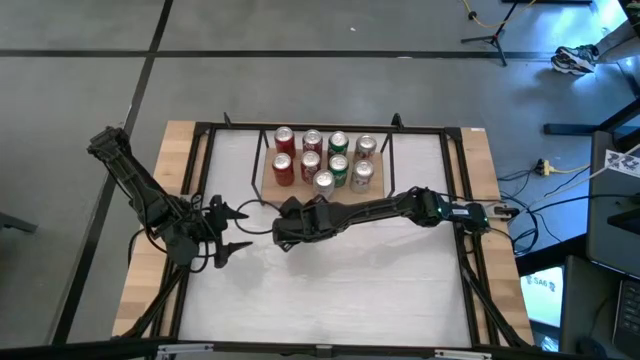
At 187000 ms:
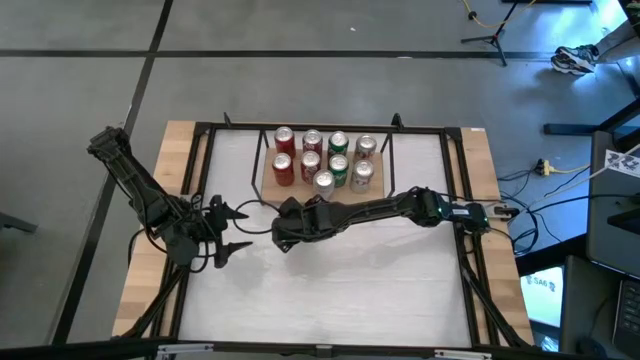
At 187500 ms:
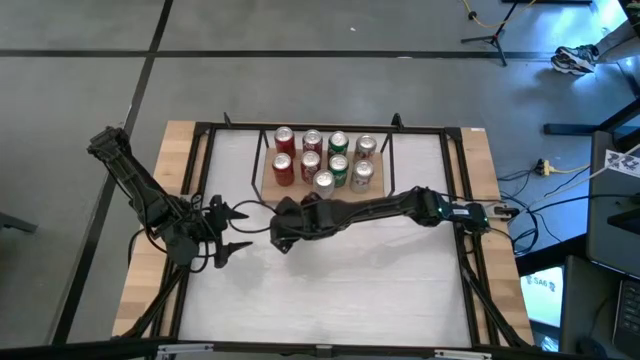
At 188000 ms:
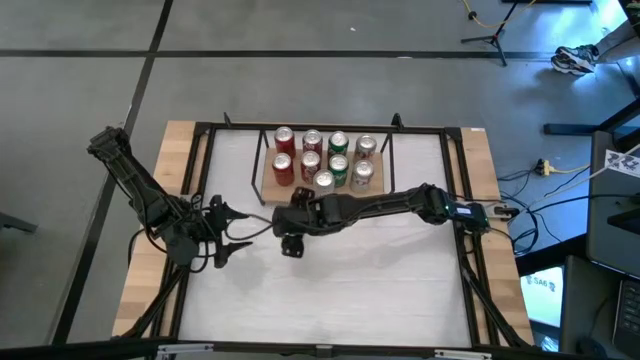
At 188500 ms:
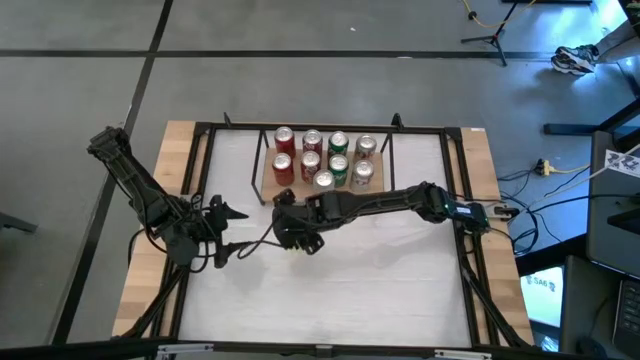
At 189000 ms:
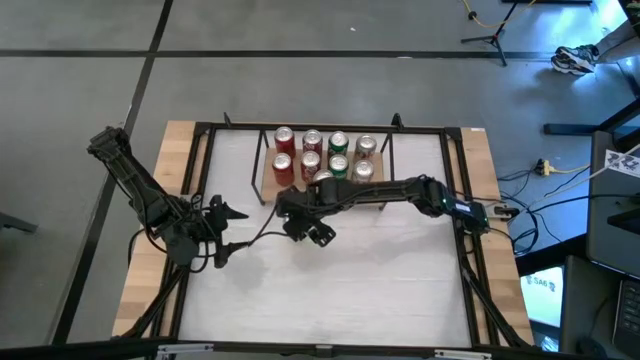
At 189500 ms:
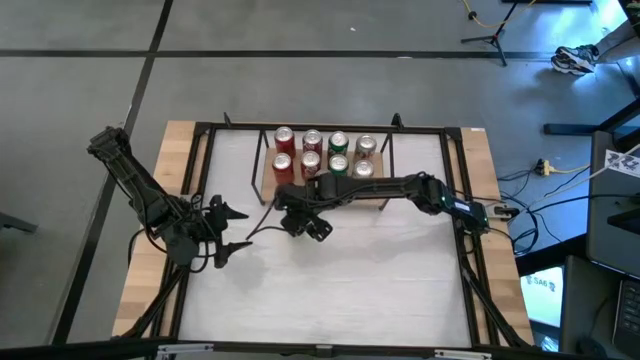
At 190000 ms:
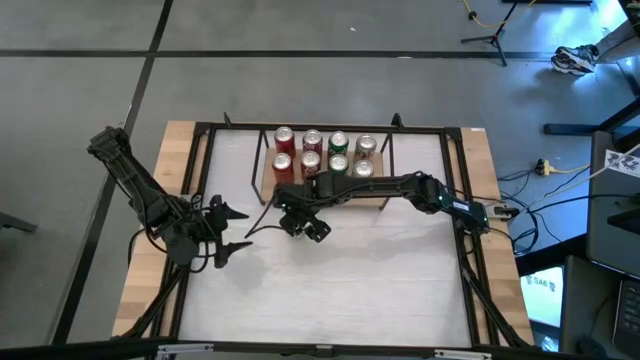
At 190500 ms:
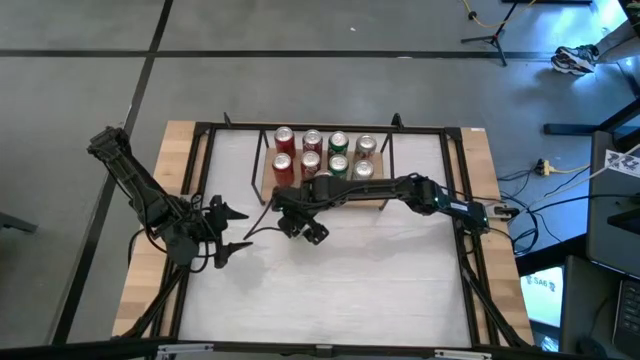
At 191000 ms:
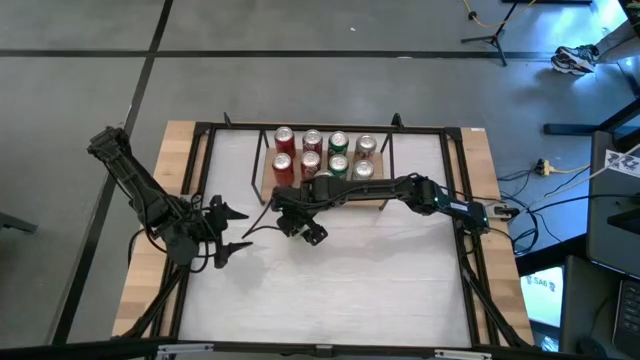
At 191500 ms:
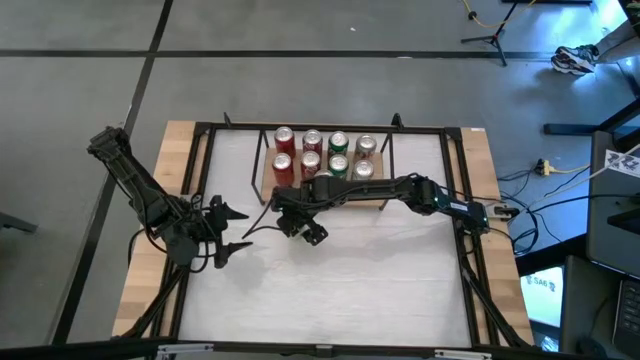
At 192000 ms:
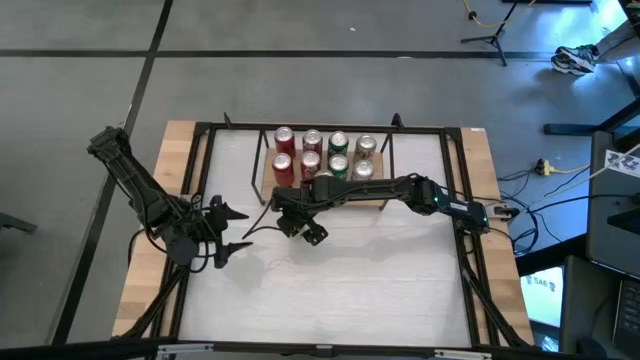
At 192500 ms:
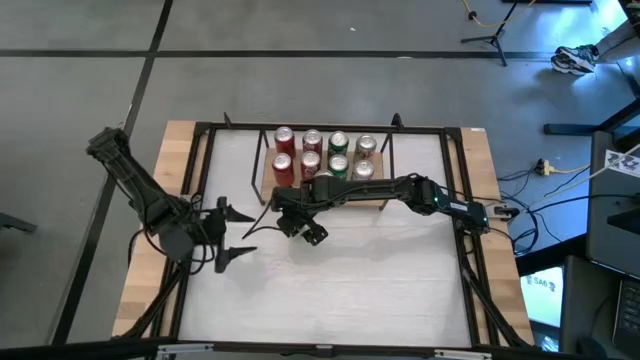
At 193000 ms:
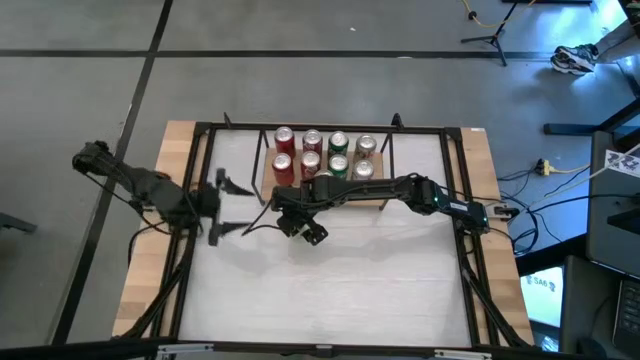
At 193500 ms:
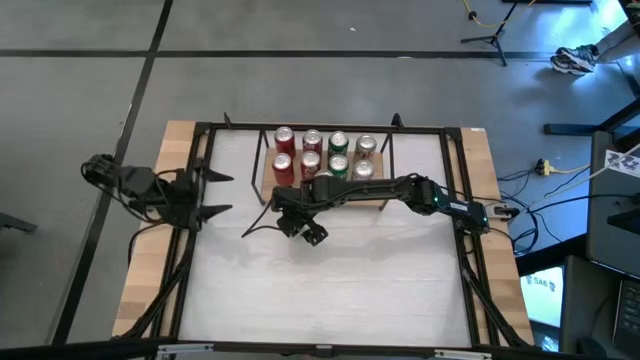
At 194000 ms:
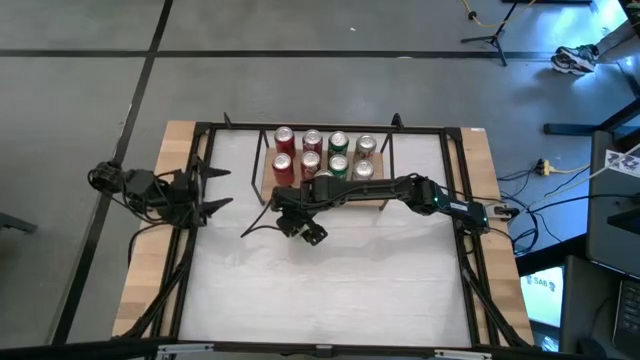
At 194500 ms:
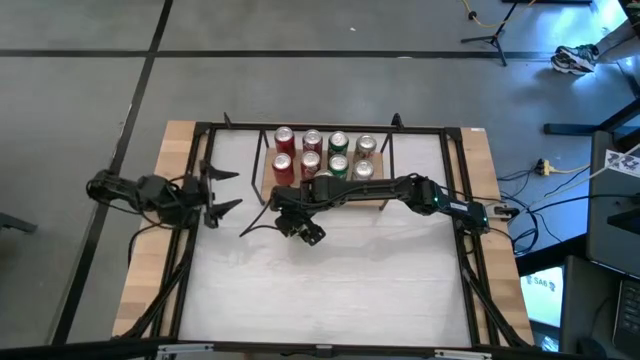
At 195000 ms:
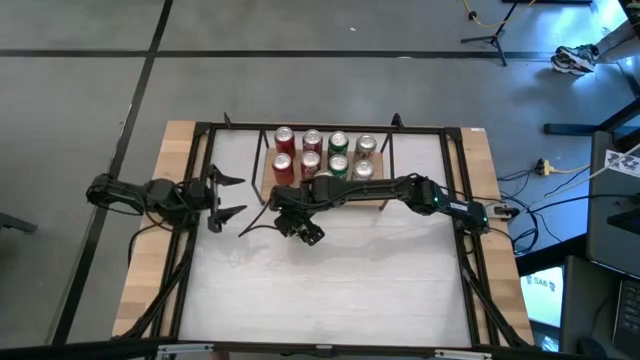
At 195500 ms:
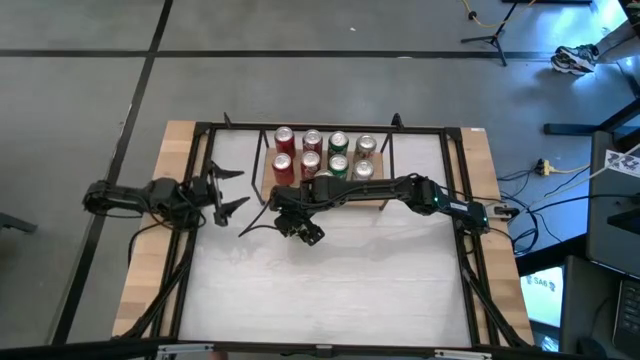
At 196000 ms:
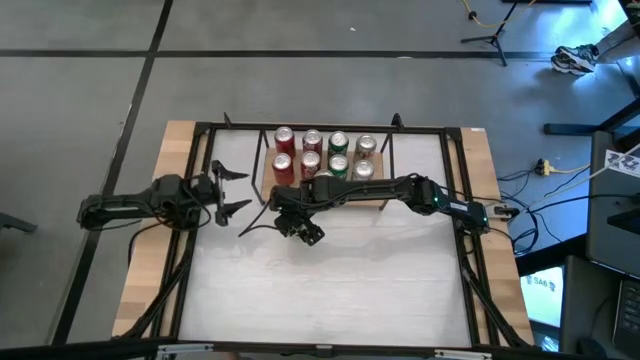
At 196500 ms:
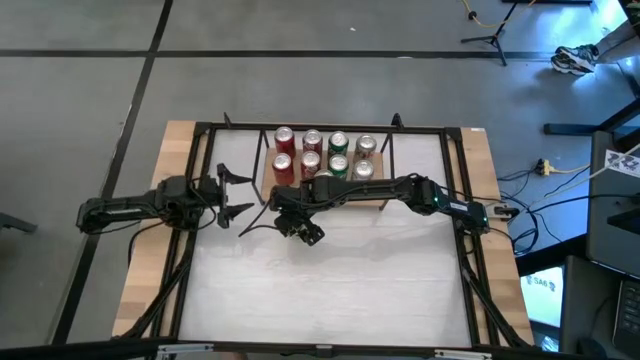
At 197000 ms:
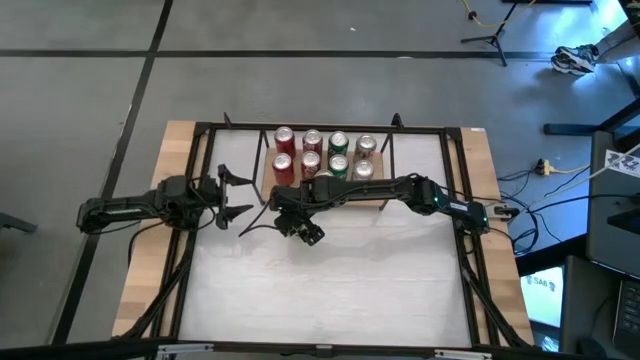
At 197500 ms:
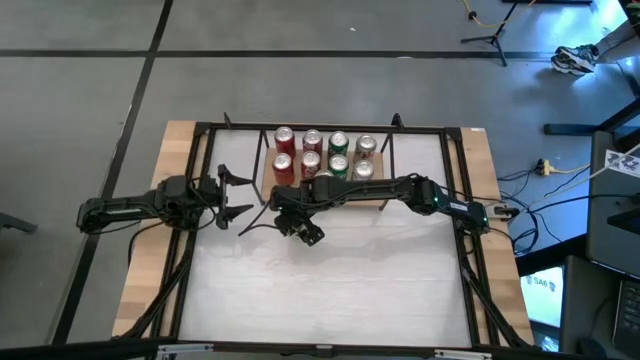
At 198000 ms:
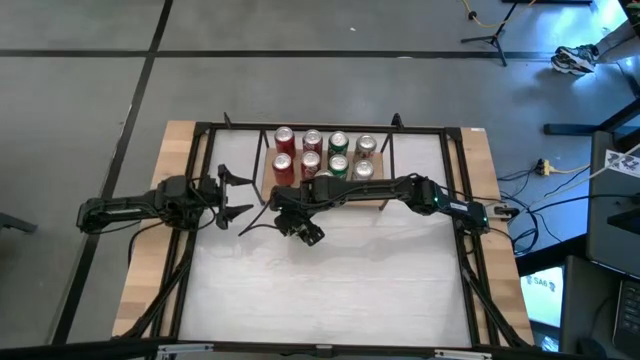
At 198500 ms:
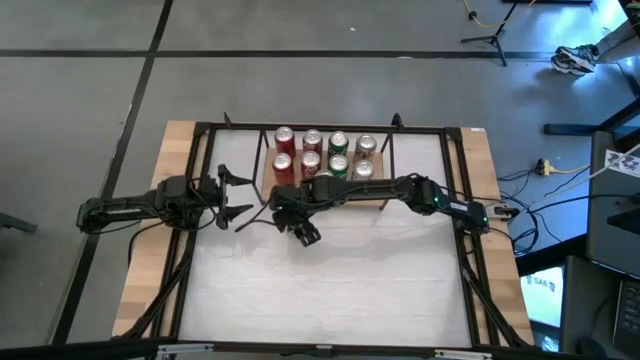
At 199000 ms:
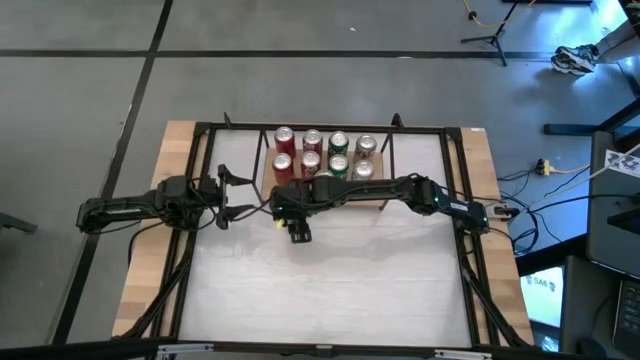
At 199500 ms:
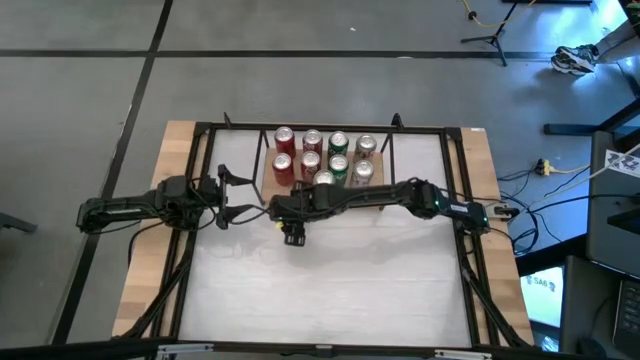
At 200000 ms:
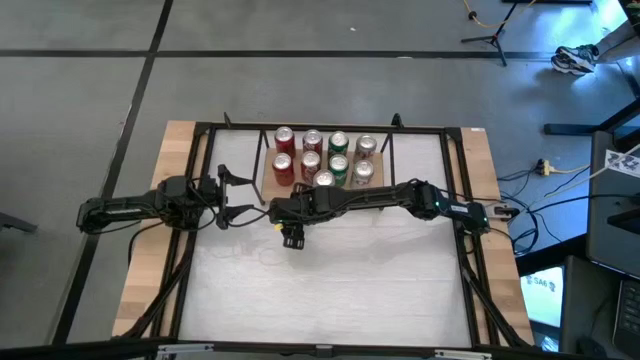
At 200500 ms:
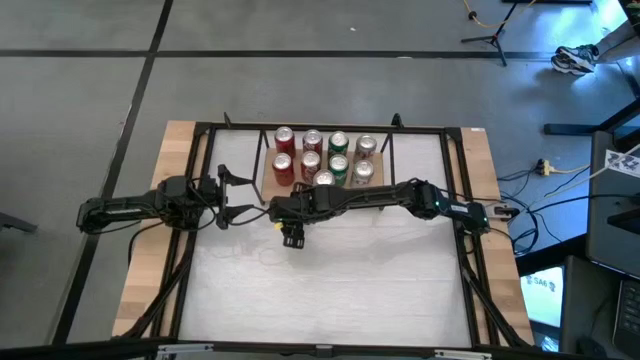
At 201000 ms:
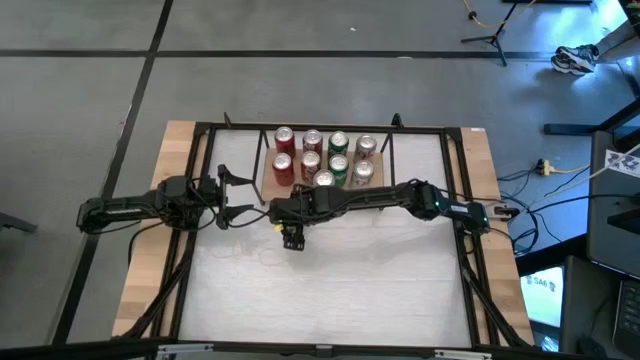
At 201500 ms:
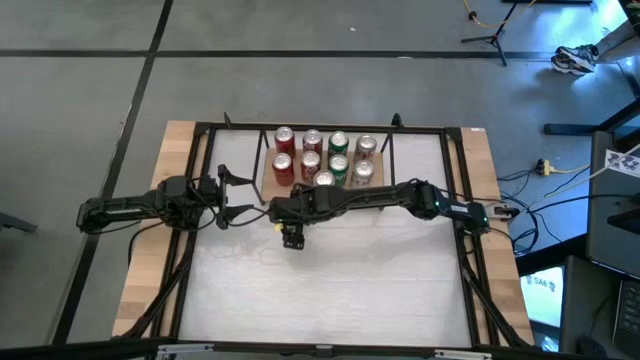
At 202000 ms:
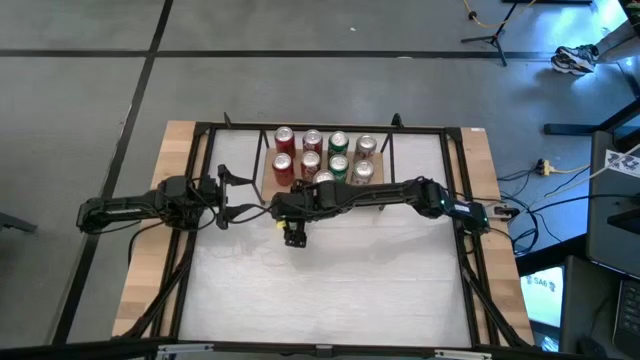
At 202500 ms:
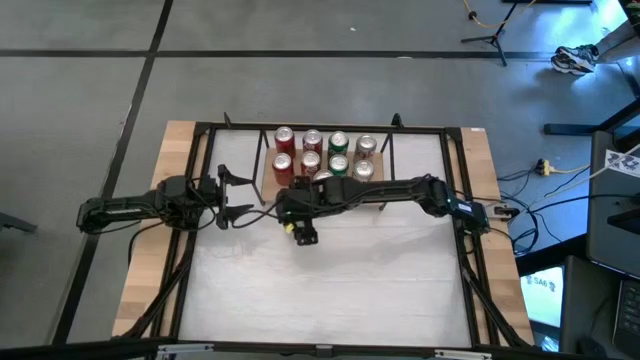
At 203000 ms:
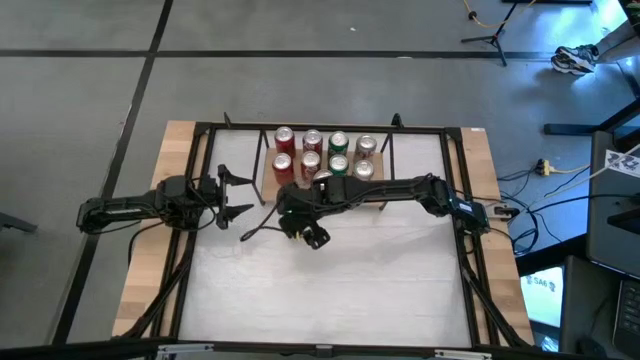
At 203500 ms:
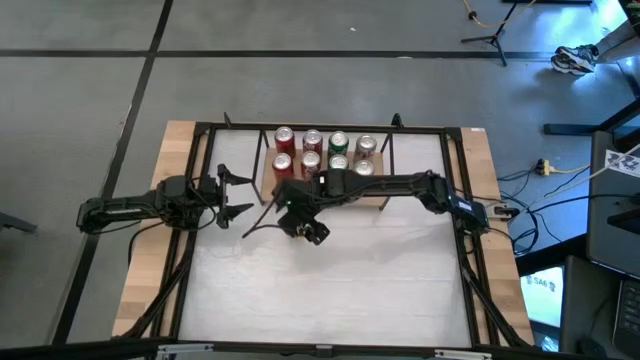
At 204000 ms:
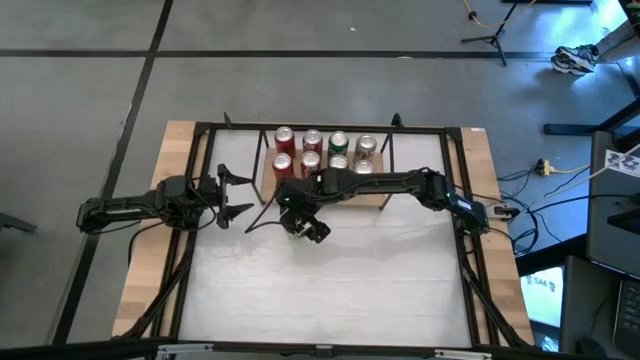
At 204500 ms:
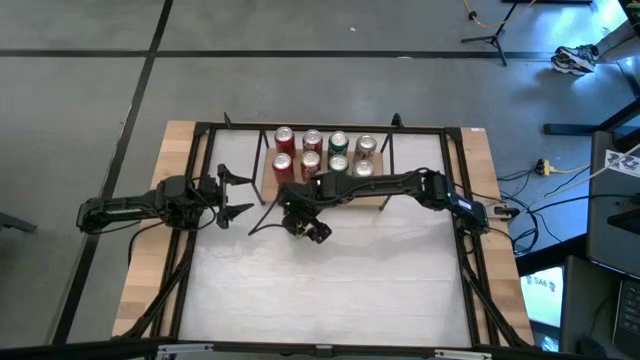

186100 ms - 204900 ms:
Task: Place canned beverage on shelf
Put the light green soda can on the shelf

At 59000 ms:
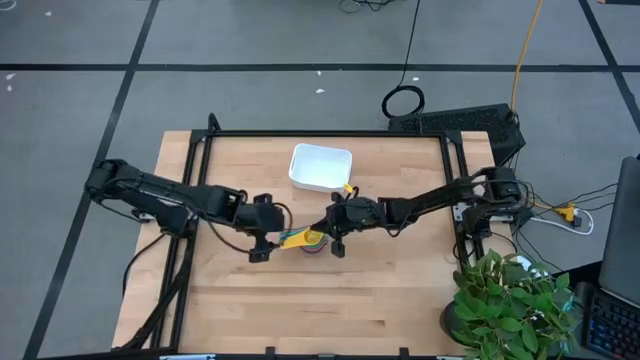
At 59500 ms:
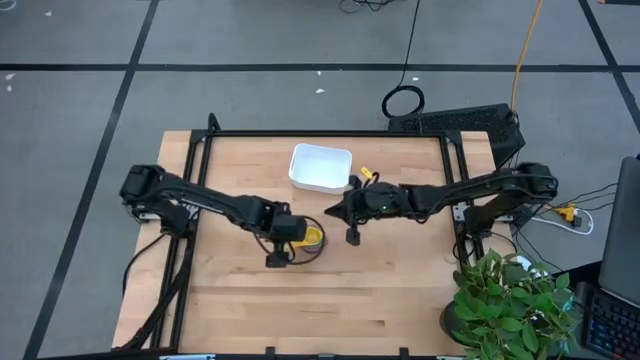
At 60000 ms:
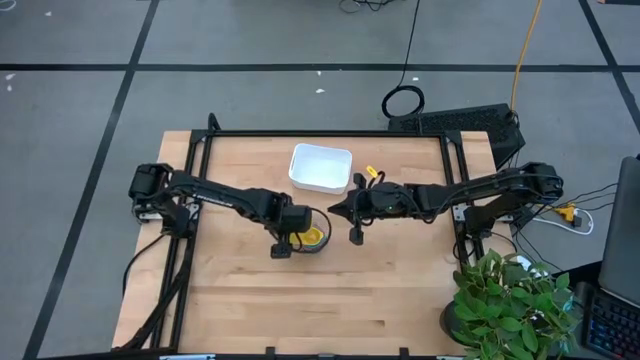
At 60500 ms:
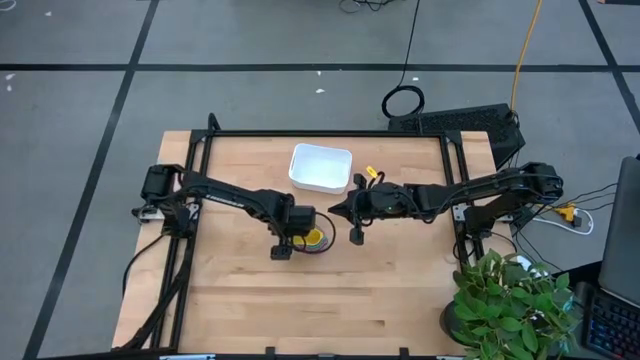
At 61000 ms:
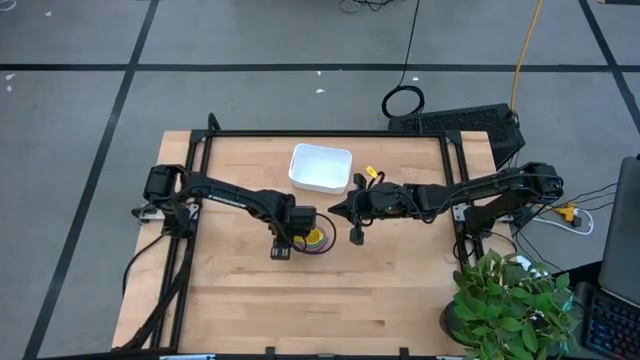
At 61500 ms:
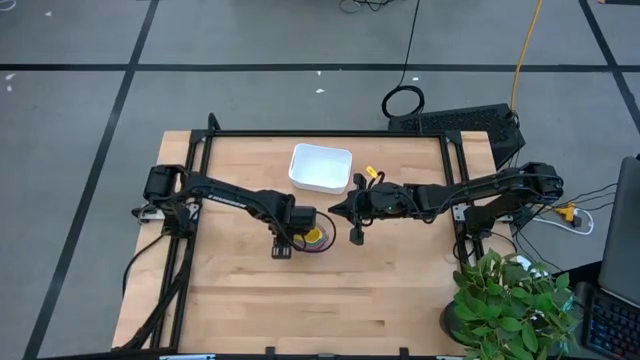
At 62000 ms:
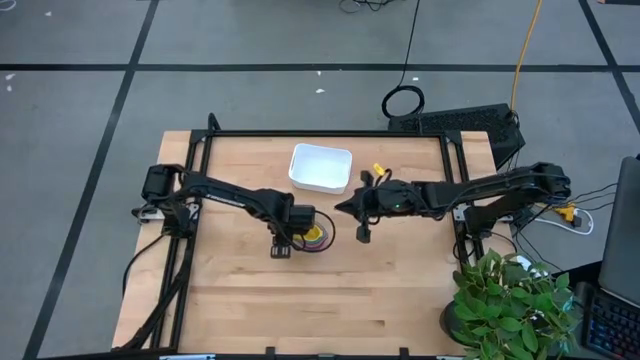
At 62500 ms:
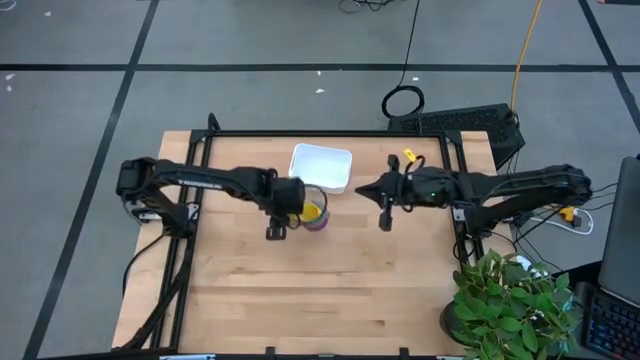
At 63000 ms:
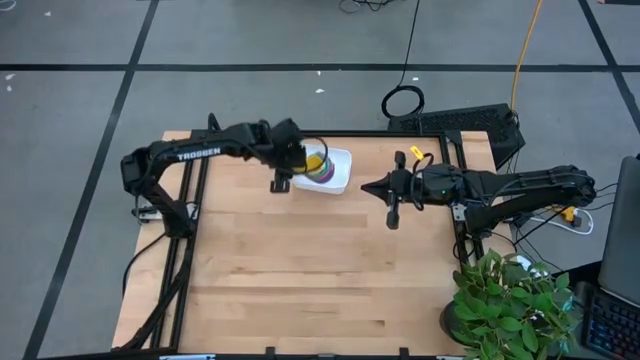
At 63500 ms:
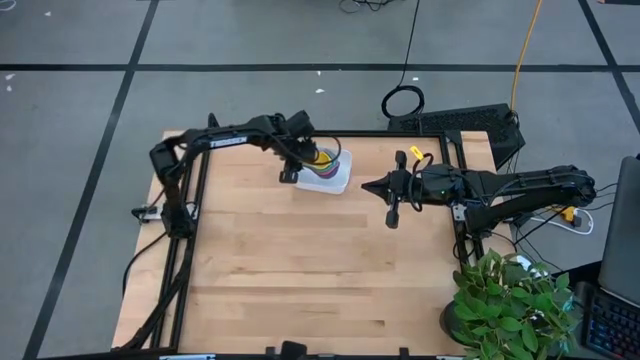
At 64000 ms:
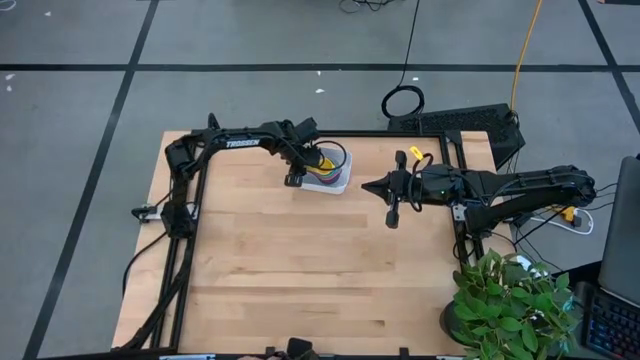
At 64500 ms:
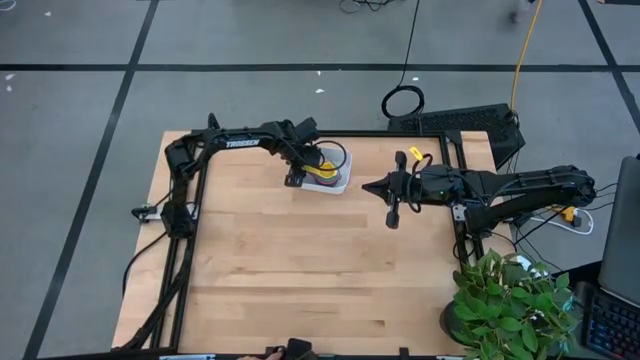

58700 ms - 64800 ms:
Task: Nest measuring cups in basket
Put the nested measuring cups into the white bin
